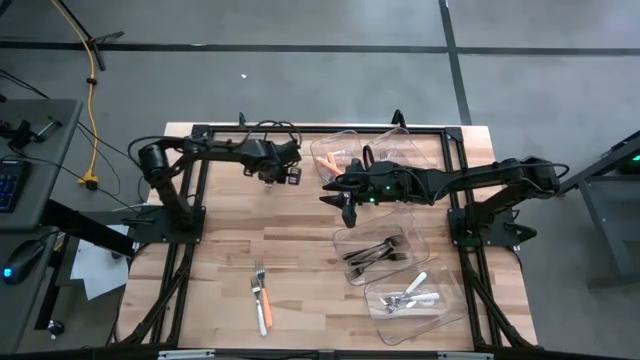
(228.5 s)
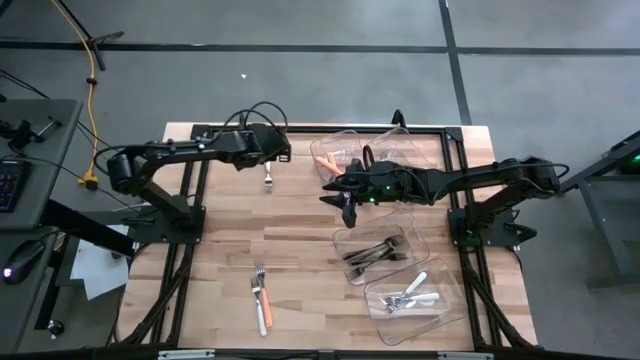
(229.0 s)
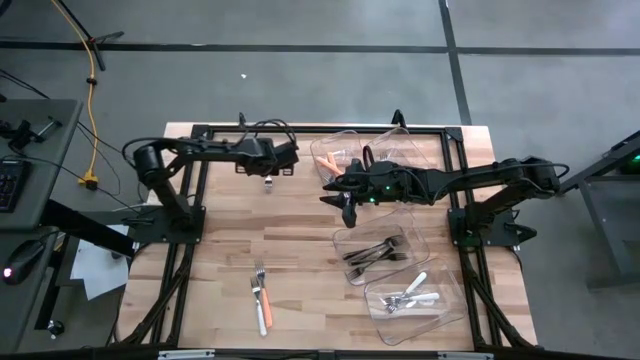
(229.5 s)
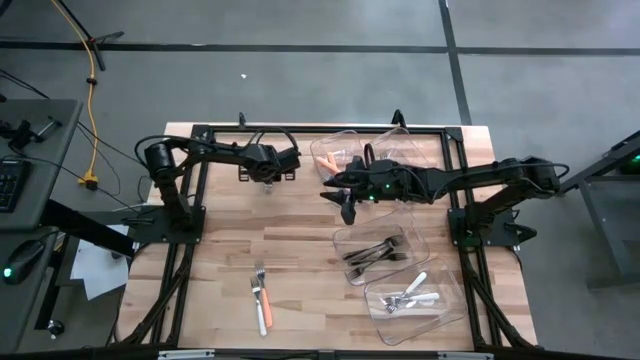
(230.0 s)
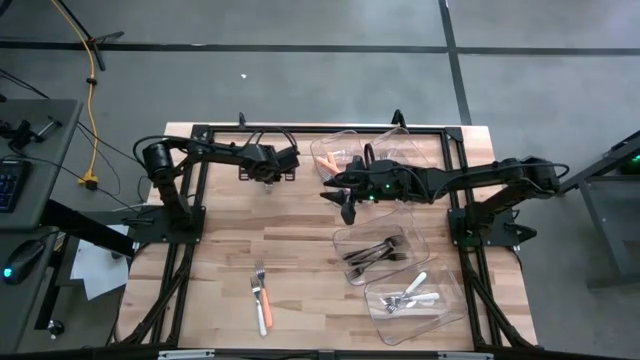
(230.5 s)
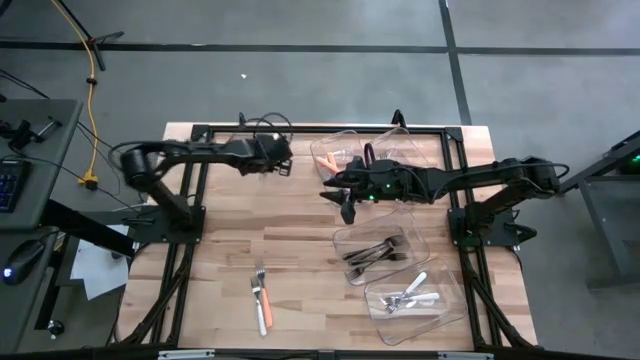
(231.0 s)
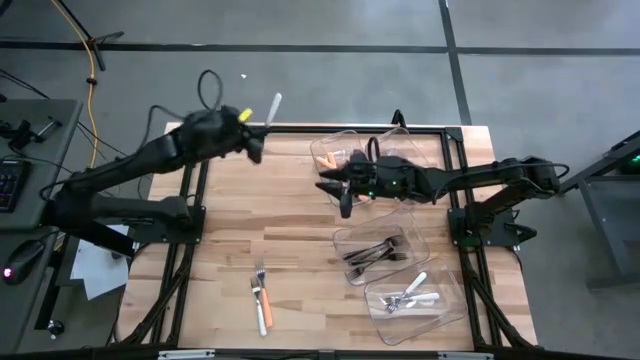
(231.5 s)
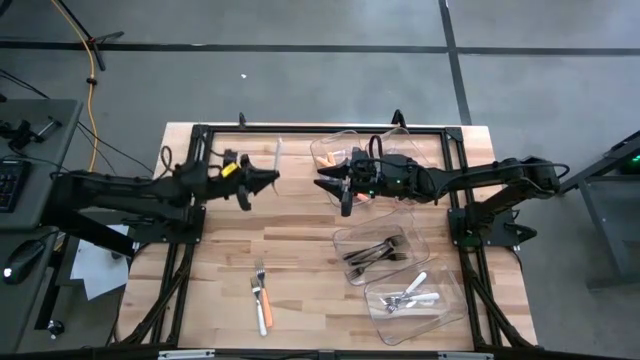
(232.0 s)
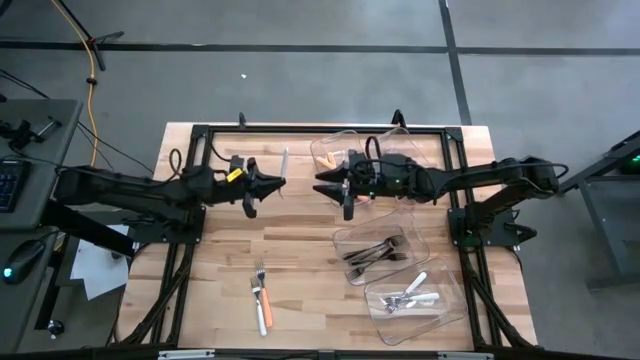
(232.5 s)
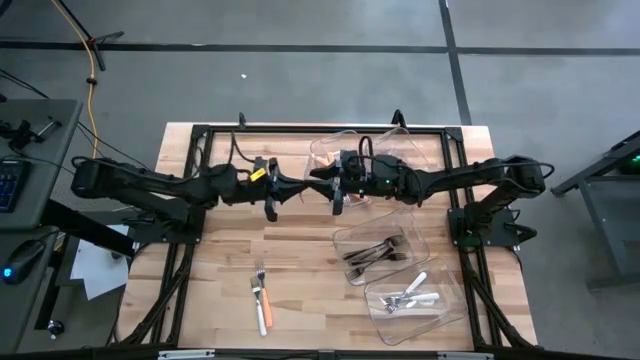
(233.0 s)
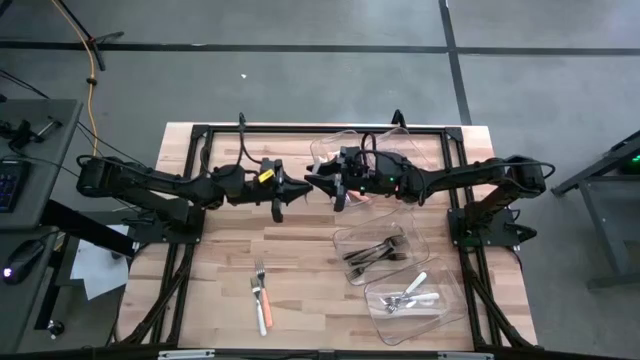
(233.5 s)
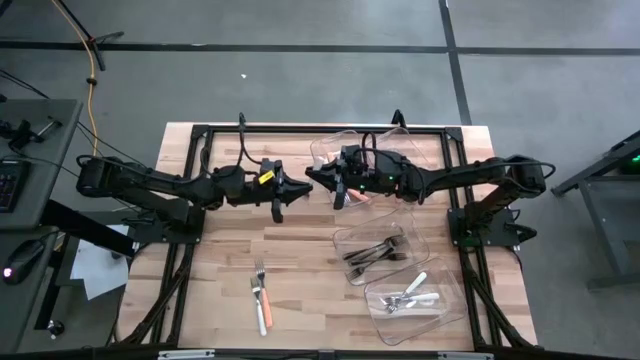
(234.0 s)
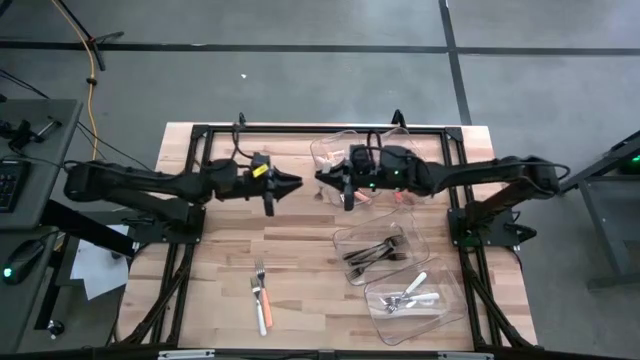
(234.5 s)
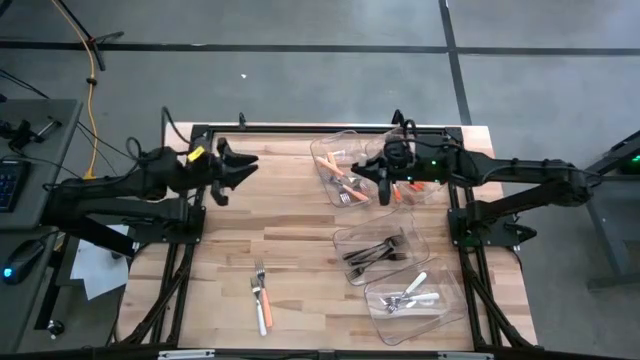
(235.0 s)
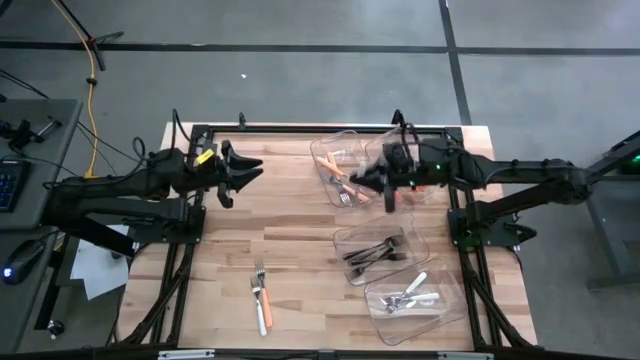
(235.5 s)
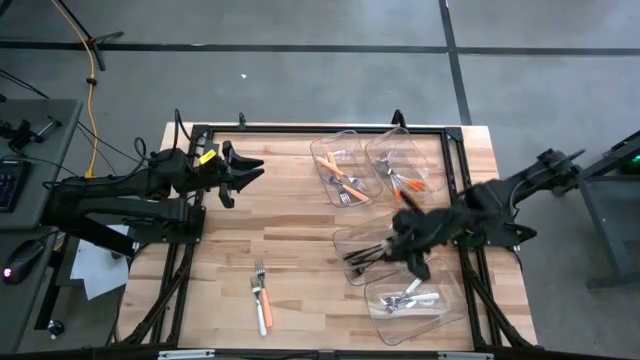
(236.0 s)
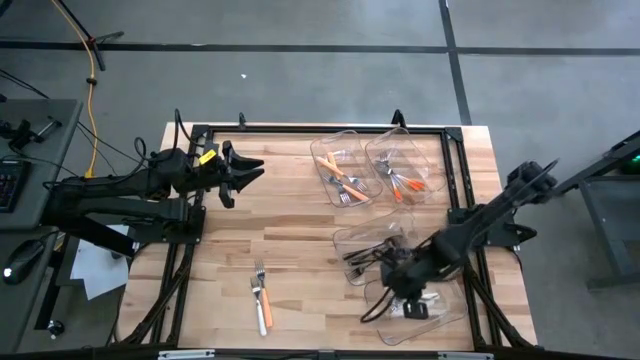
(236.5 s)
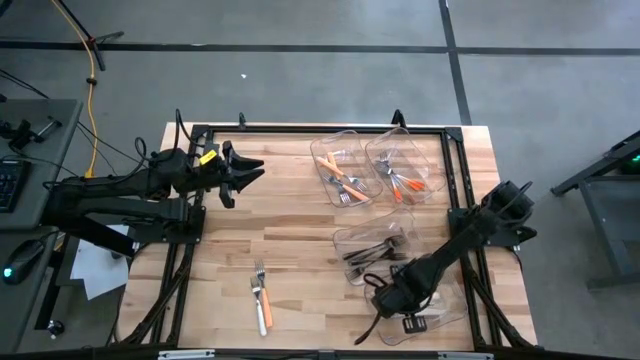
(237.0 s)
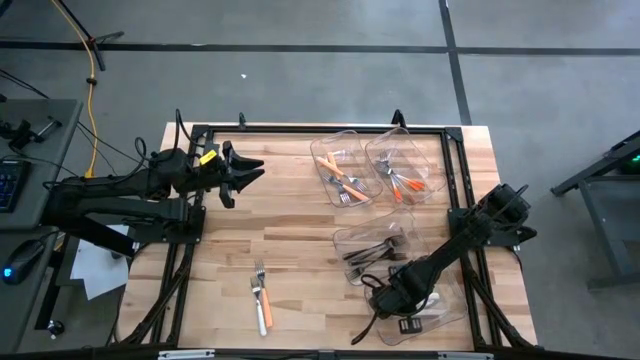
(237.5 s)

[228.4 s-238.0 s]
Task: Sort silverware by color (type)
Put the white fork into the bottom transparent bin

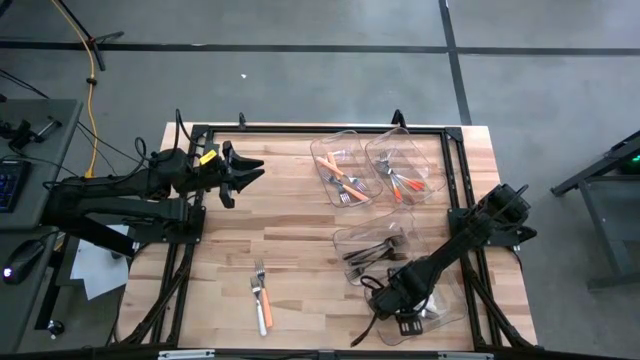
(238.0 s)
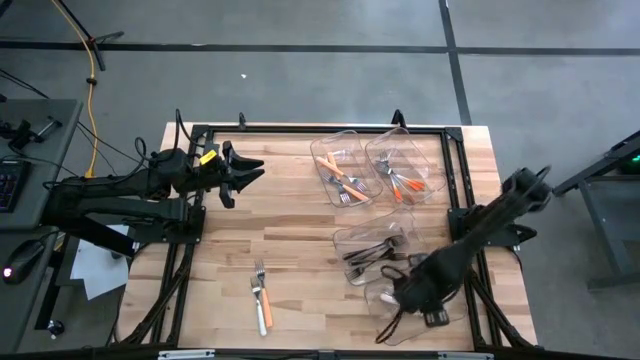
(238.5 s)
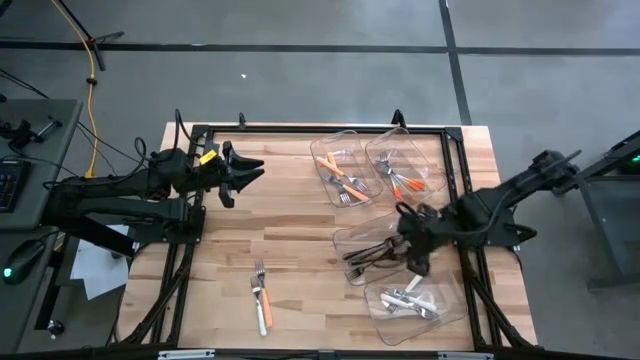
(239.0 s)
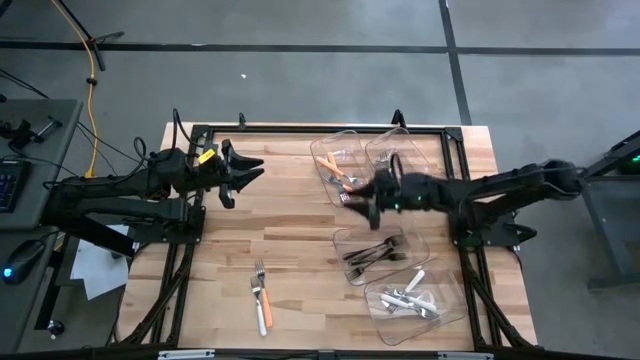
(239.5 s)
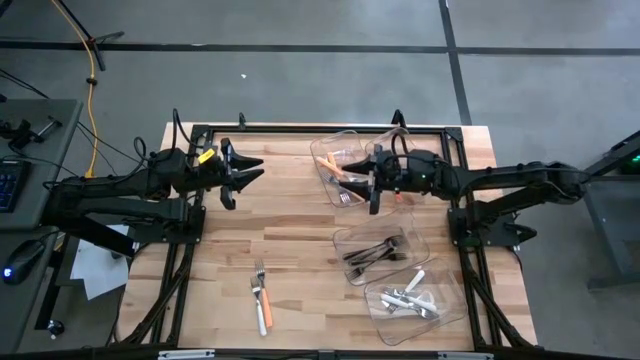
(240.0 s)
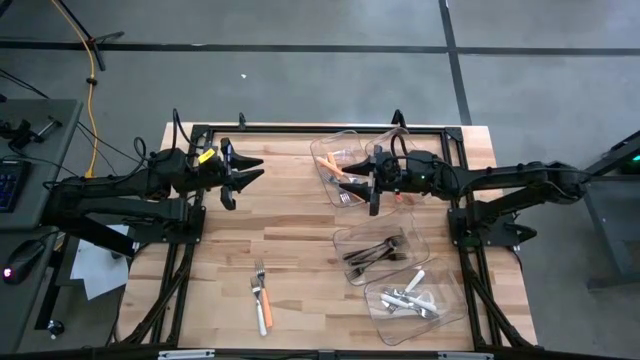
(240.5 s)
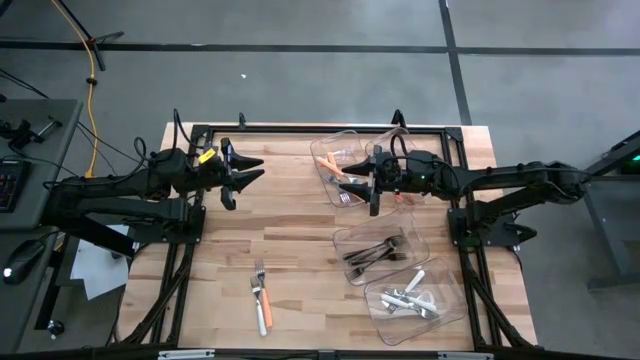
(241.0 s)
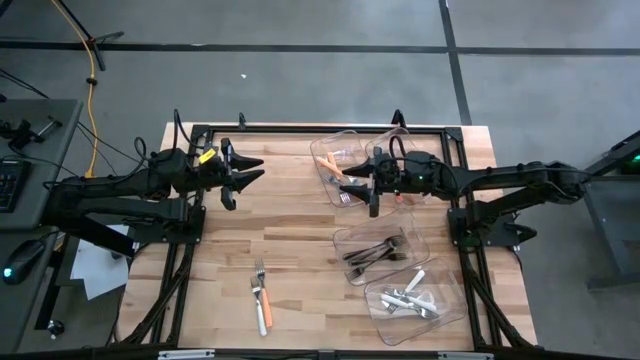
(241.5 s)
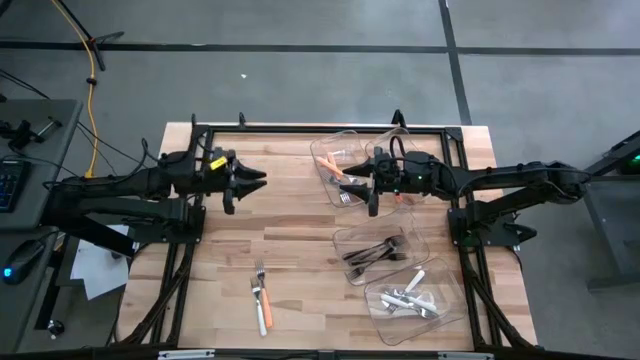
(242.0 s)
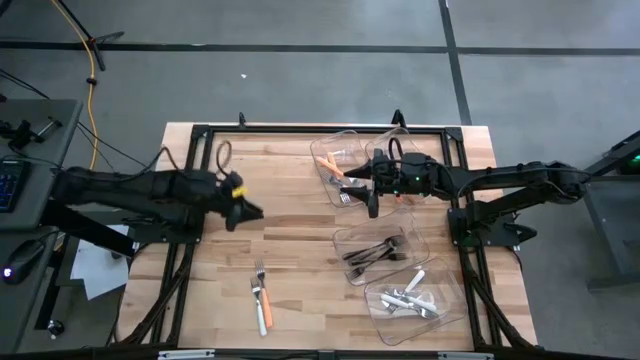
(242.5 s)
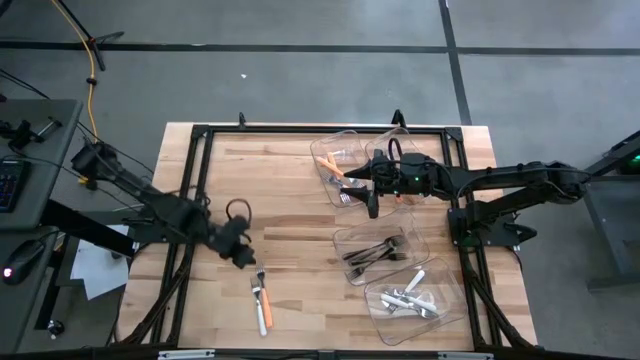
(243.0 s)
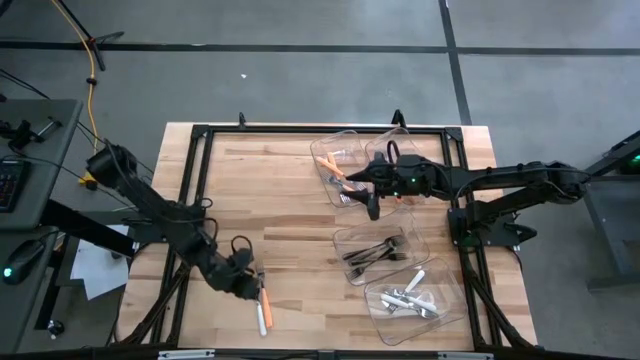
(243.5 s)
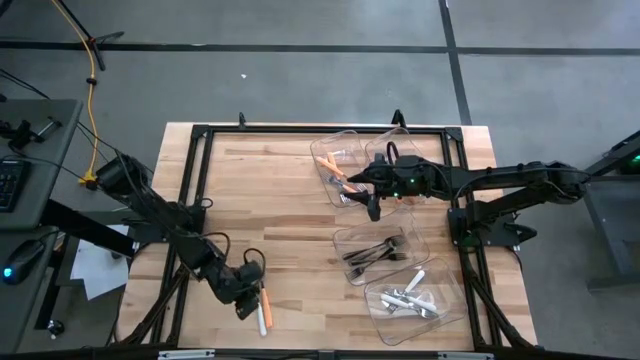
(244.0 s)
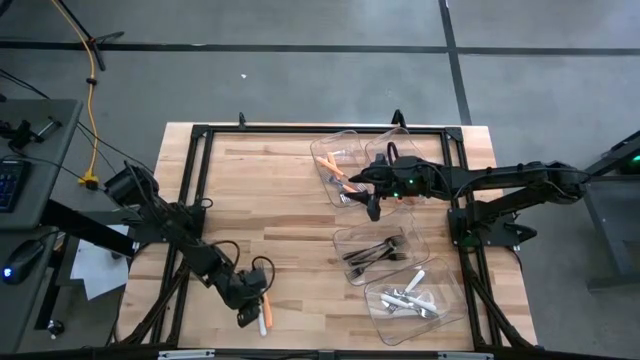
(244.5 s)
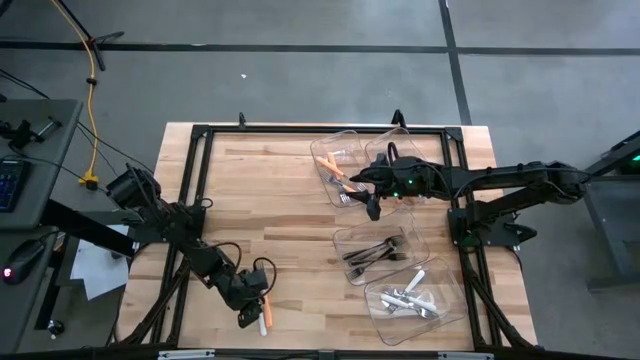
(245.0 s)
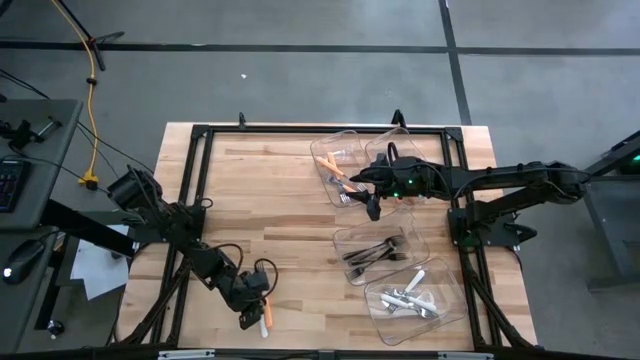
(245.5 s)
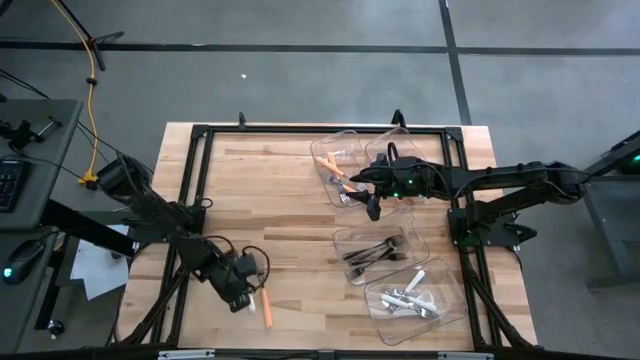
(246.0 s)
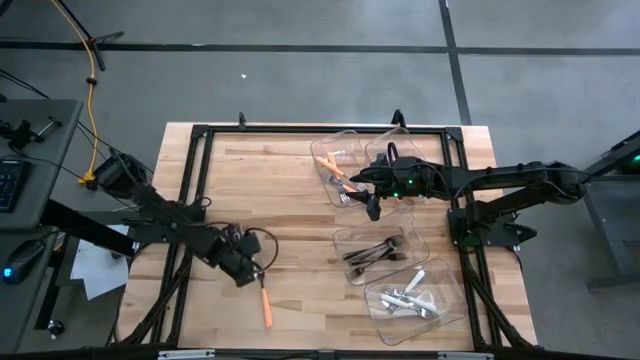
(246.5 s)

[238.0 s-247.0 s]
Move the white fork from the bottom

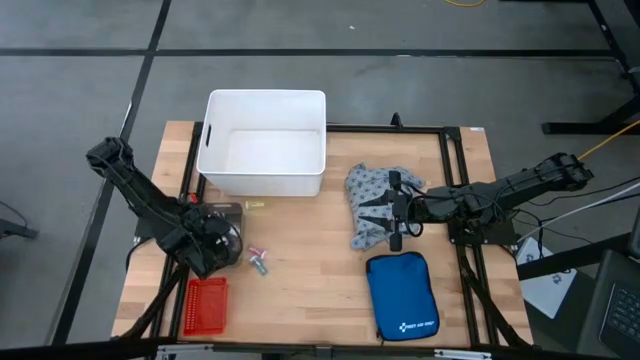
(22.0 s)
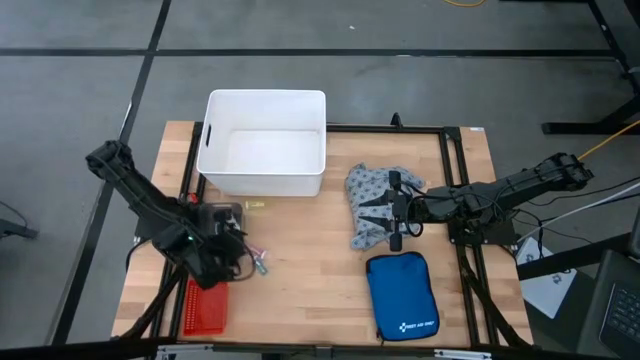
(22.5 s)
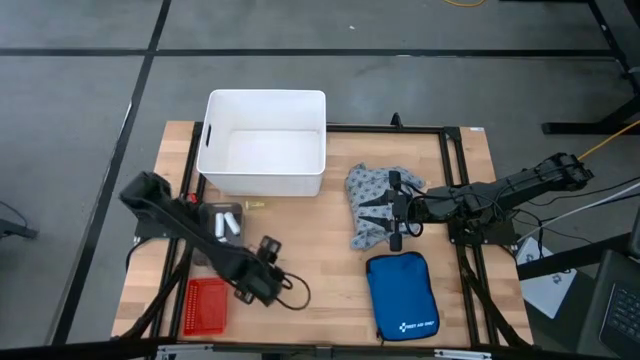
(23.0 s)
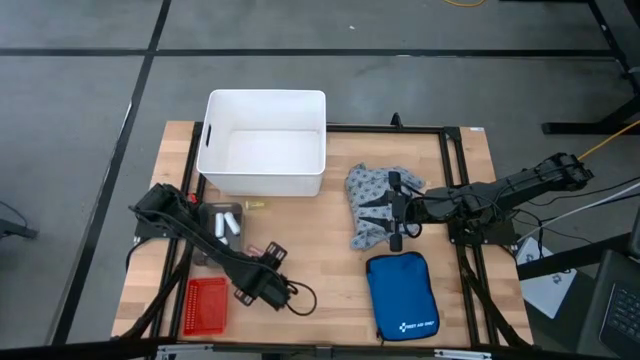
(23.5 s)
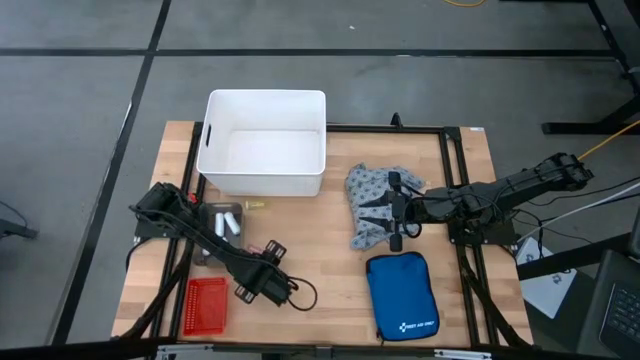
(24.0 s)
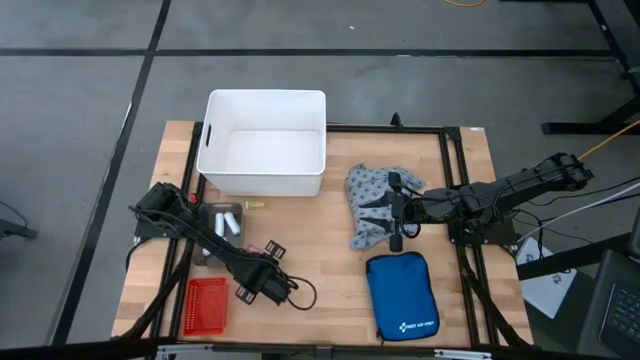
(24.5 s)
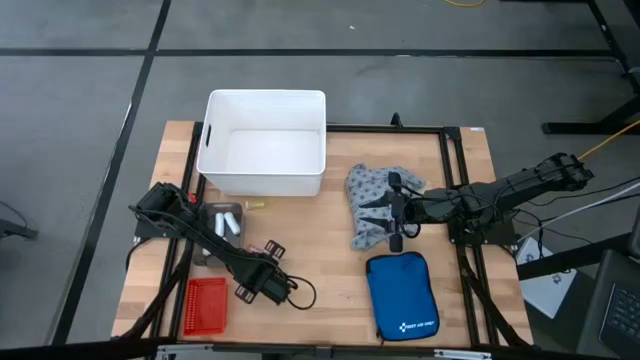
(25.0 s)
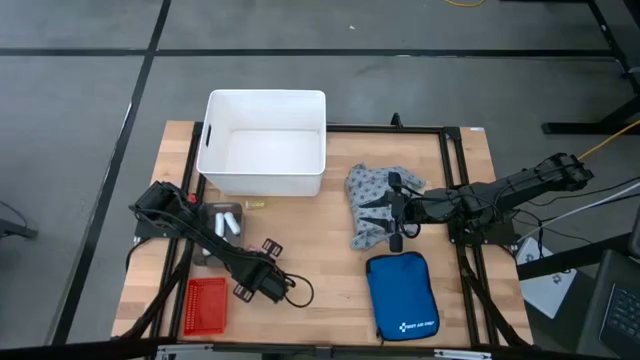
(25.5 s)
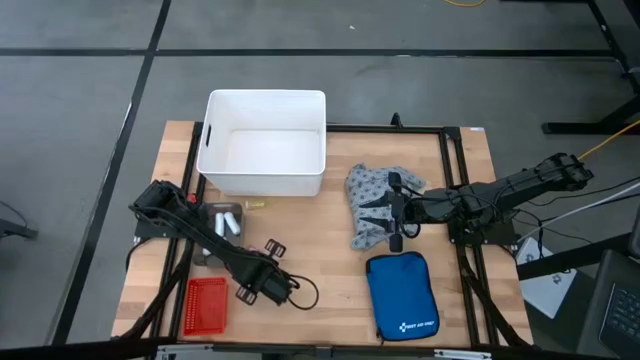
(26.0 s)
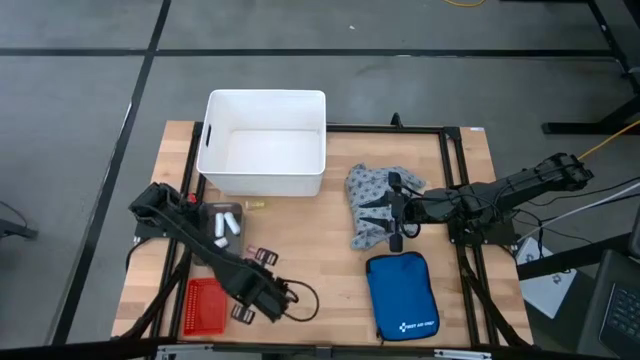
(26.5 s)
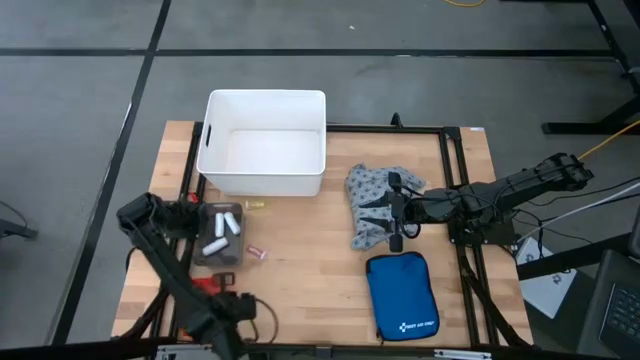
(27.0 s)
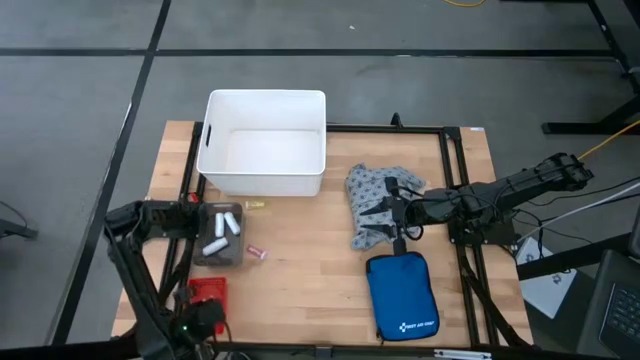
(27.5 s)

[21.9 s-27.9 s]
Task: Pick & place medical supplies in basket/bin
Put the blue pill bottle into the red bin
